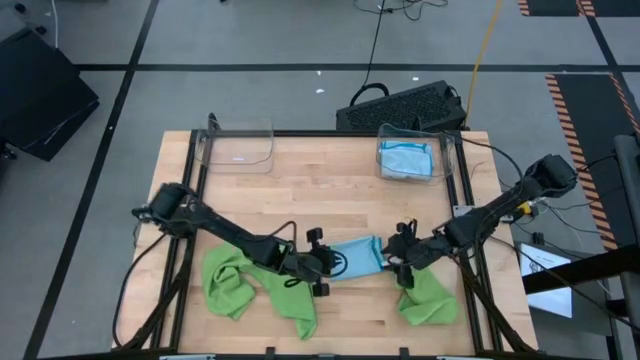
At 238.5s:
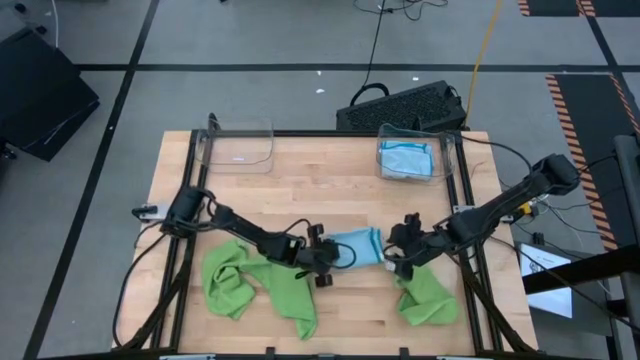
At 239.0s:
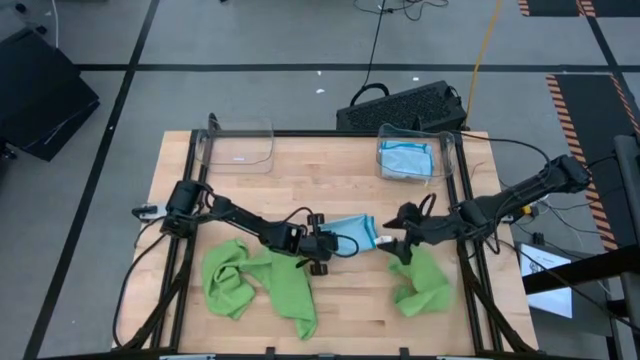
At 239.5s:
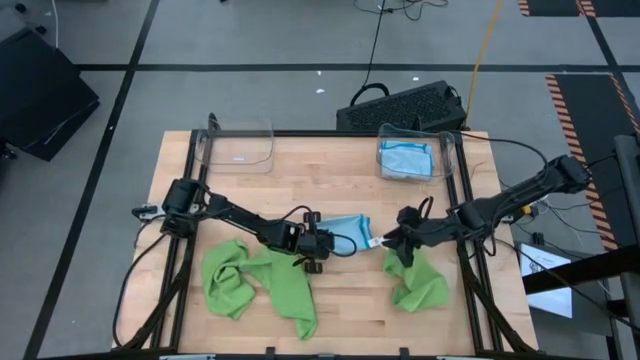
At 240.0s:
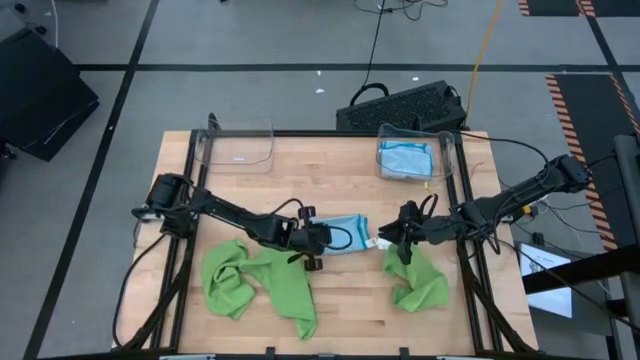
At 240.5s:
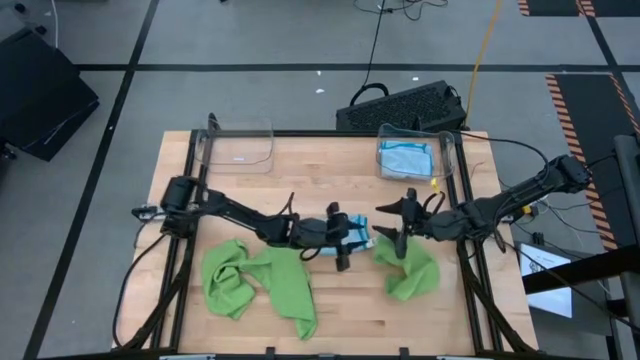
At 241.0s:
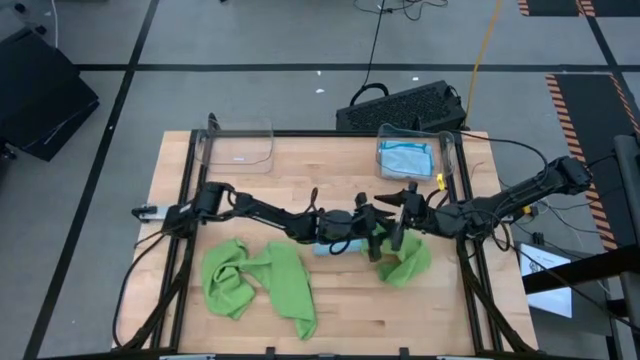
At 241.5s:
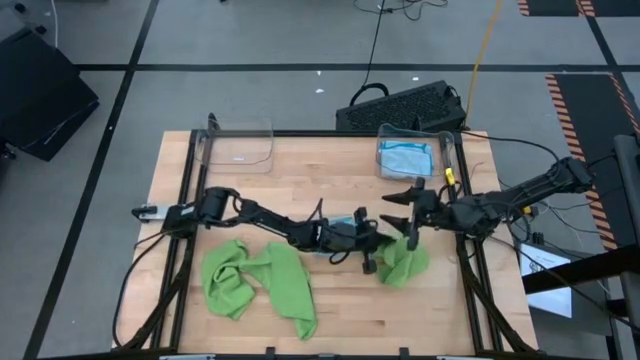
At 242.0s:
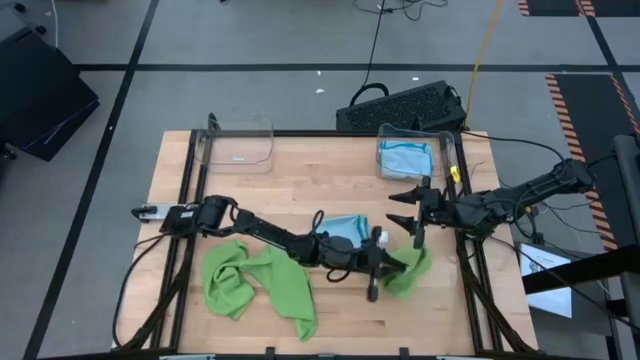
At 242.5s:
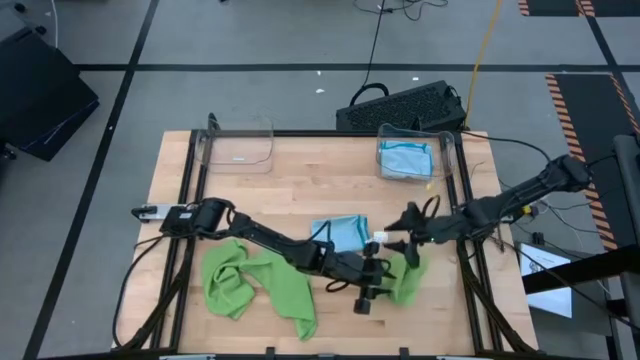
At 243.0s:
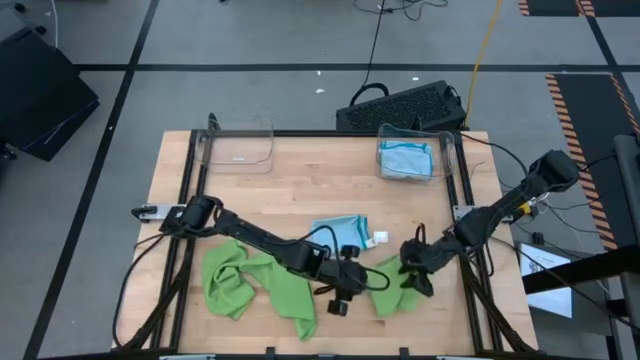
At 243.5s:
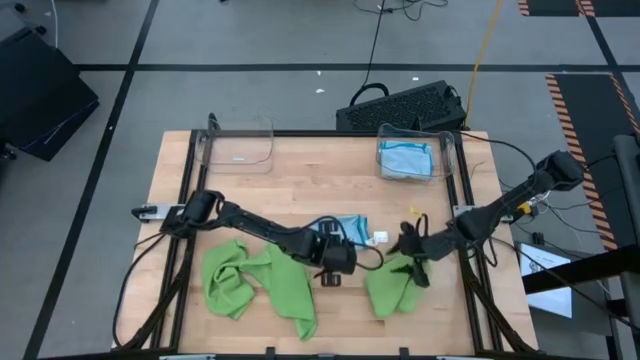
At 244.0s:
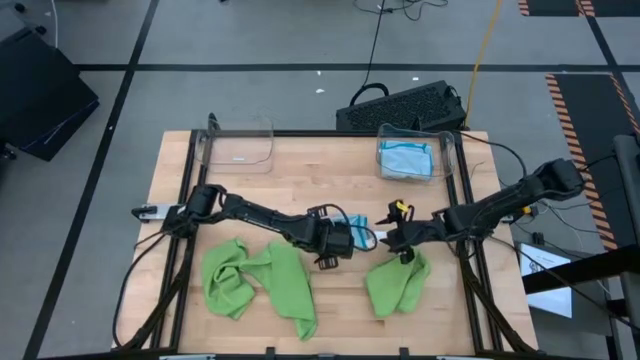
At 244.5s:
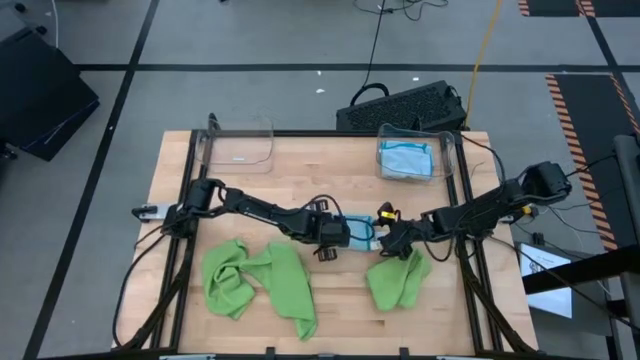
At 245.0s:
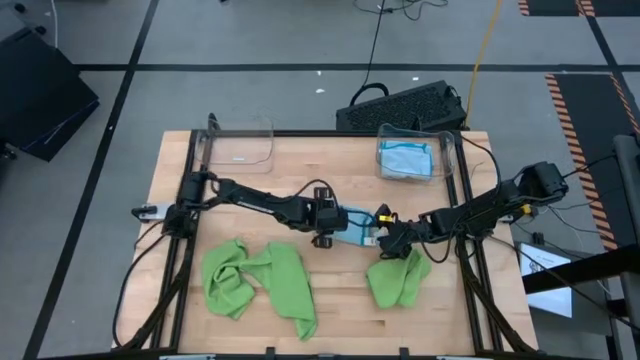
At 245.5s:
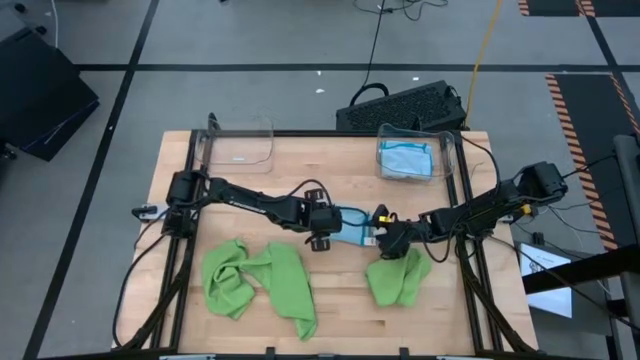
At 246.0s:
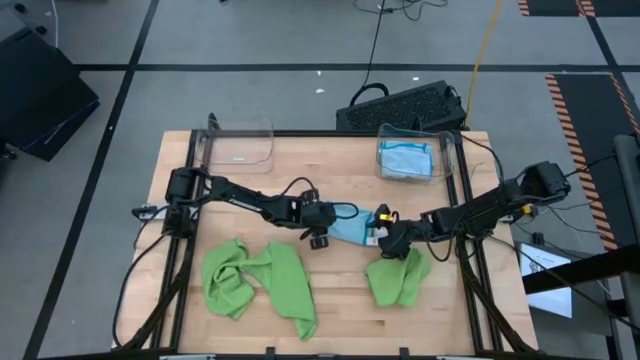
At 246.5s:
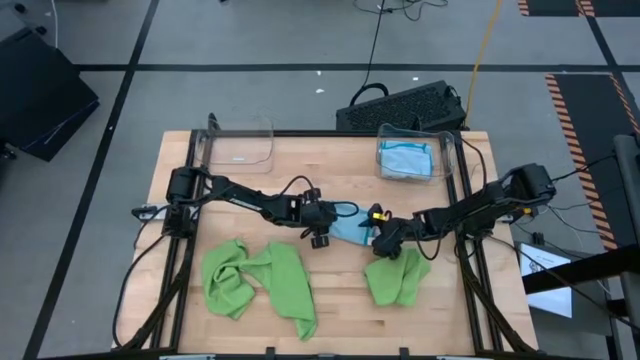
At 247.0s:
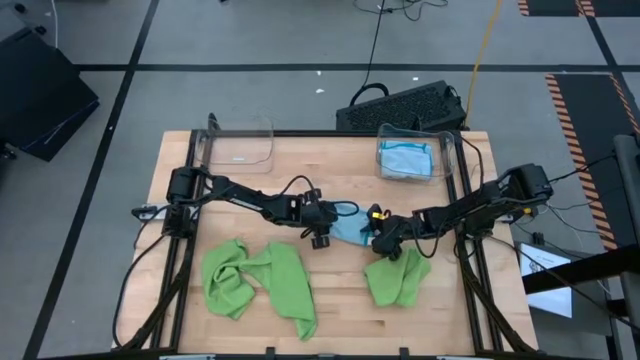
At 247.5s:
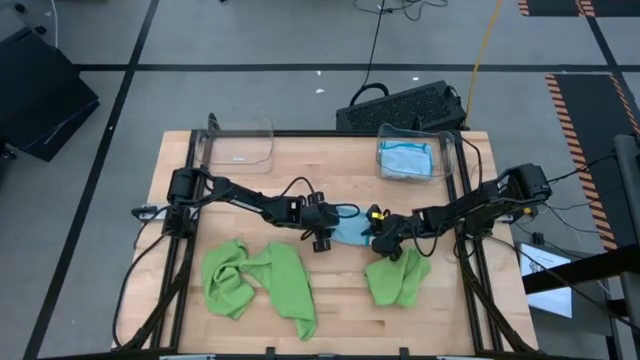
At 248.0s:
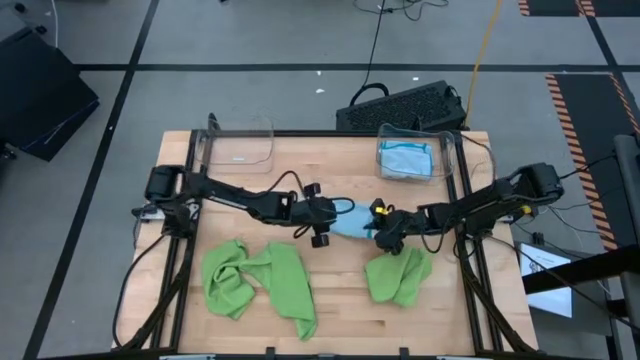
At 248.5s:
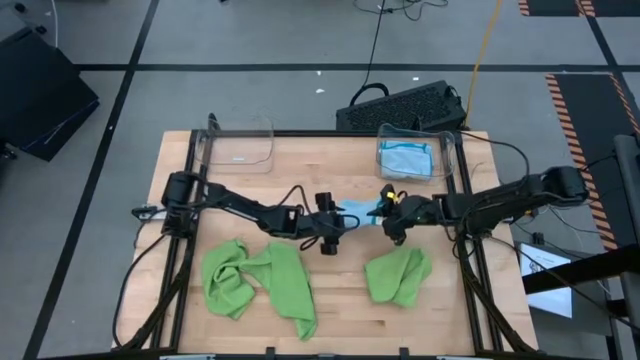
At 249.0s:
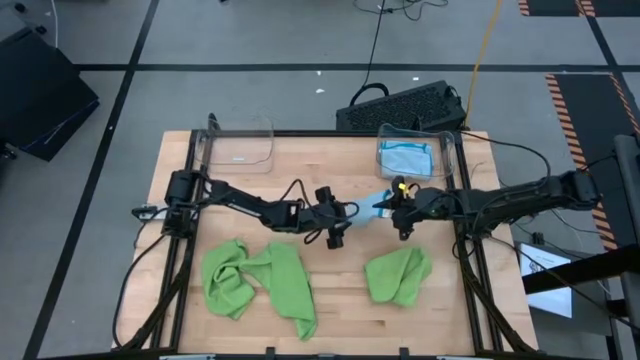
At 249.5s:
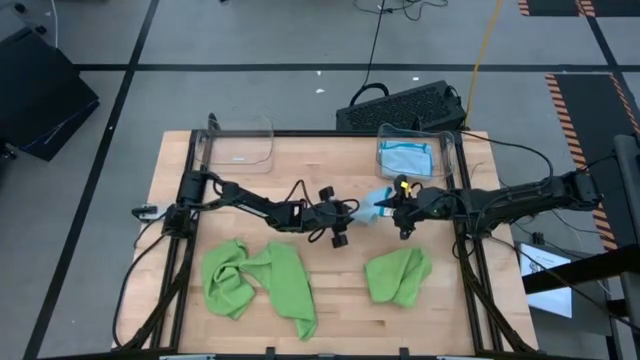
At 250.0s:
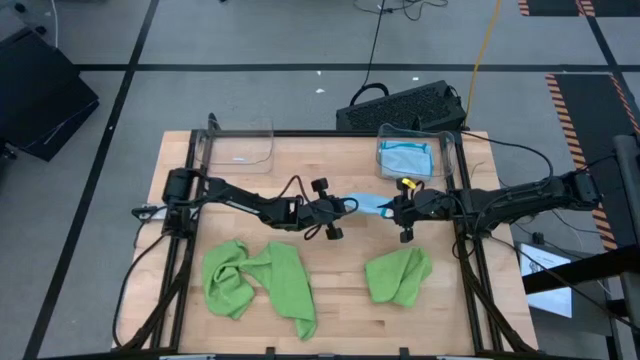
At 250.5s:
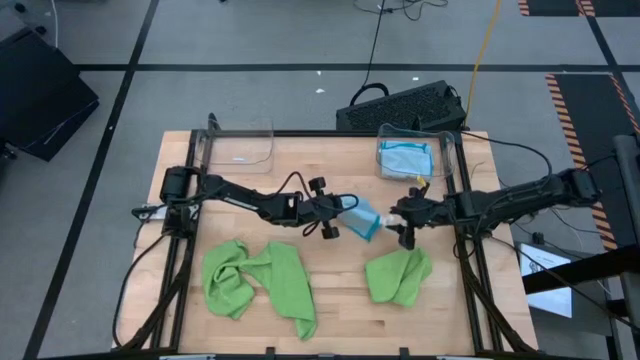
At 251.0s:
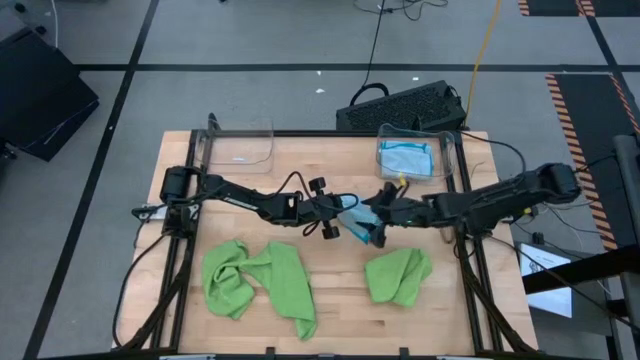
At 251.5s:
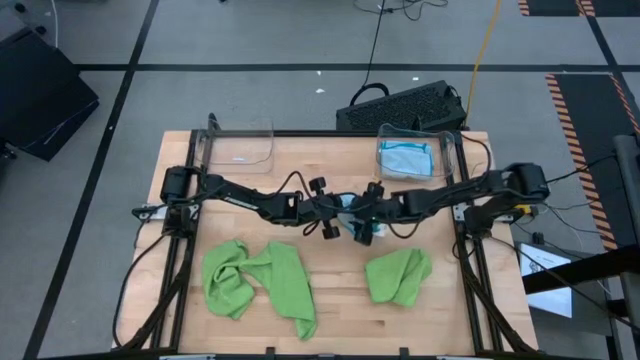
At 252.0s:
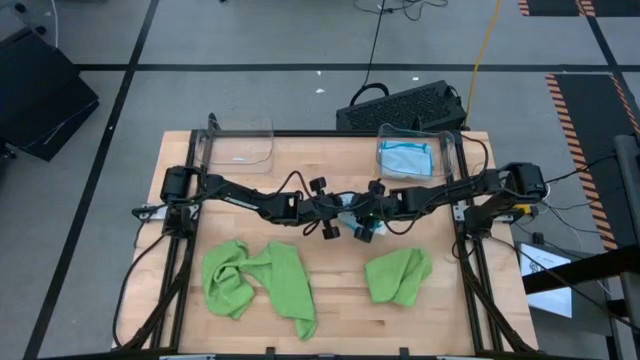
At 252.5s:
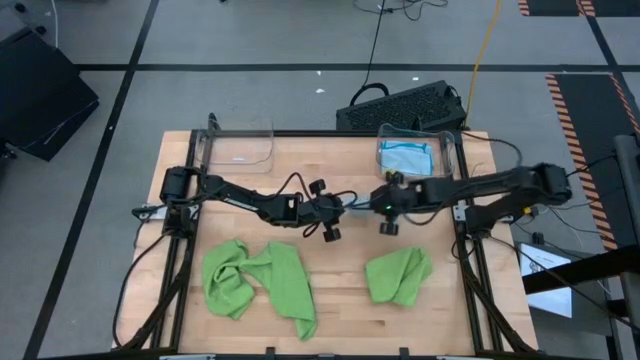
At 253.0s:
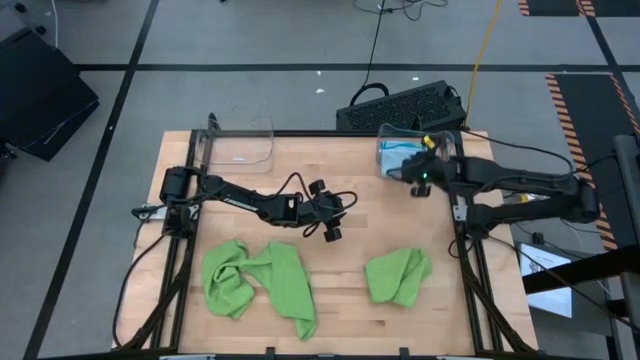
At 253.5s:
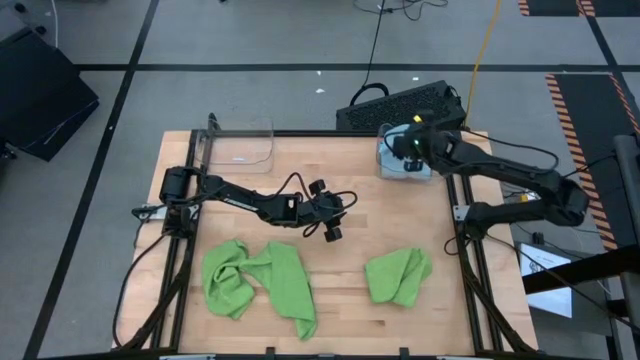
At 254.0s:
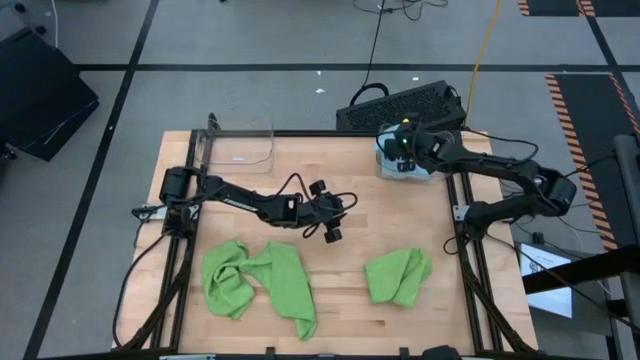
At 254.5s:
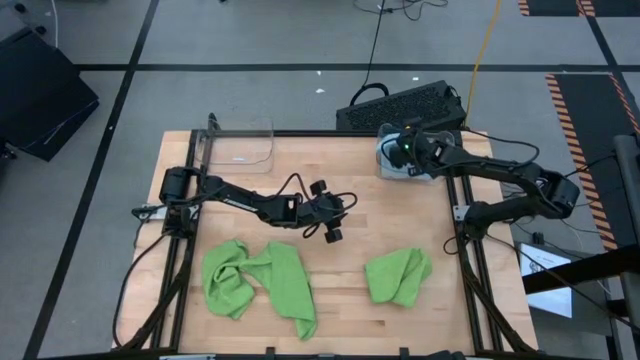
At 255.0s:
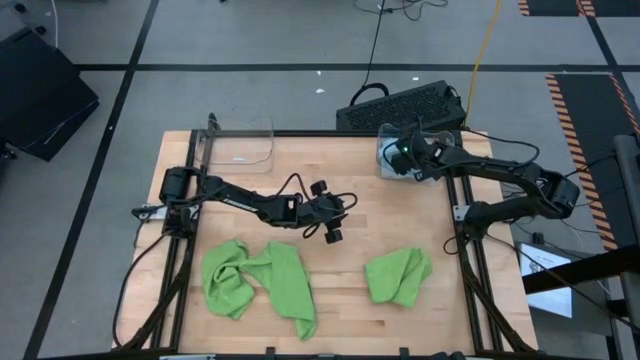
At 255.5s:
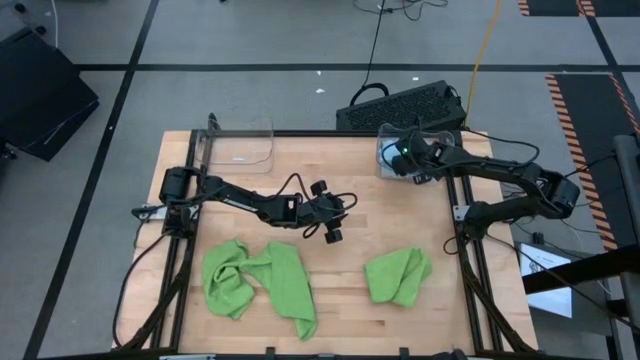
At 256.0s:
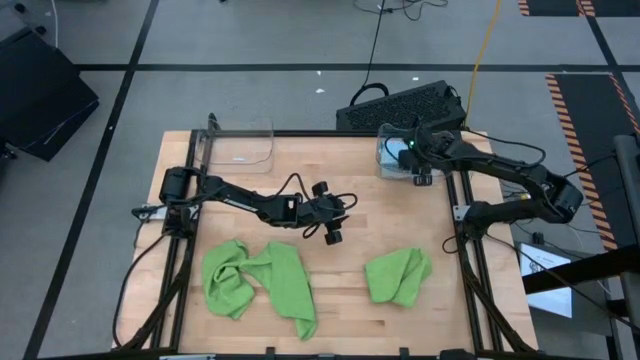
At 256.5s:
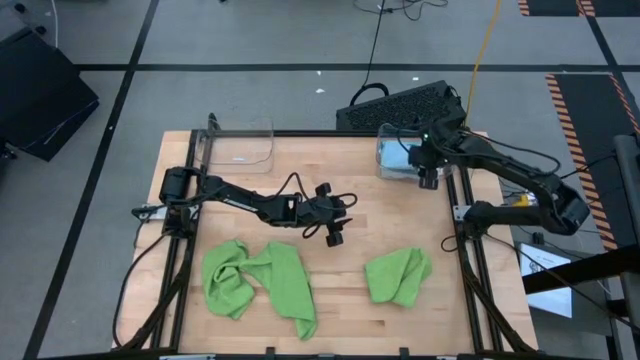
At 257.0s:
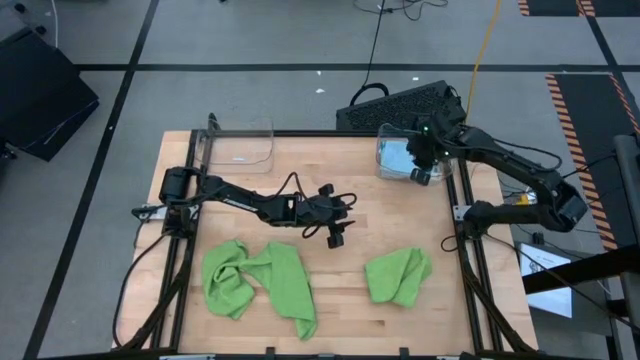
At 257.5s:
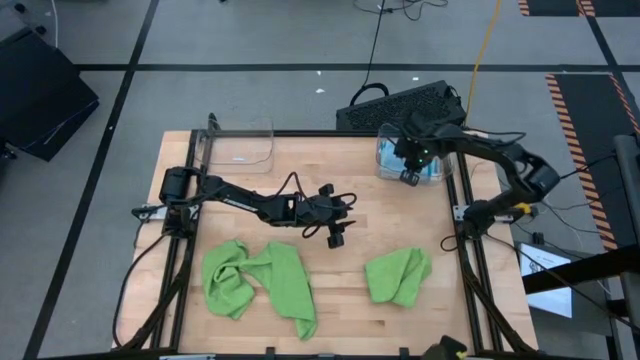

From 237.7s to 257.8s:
Task: Fold microfiber towels
Put the folded blue microfiber cloth into the right transparent bin

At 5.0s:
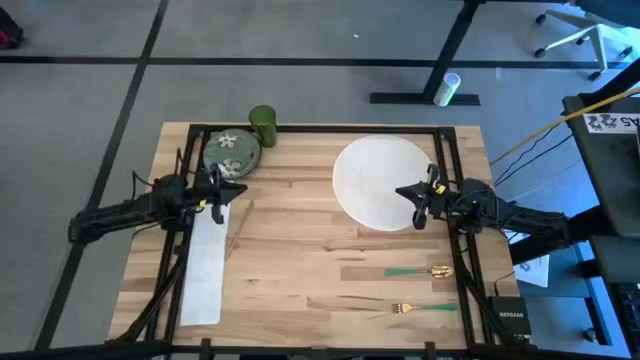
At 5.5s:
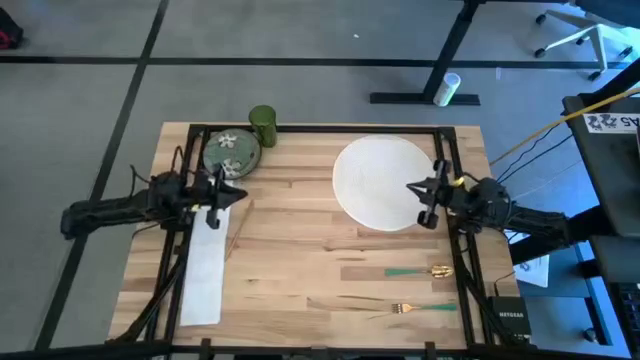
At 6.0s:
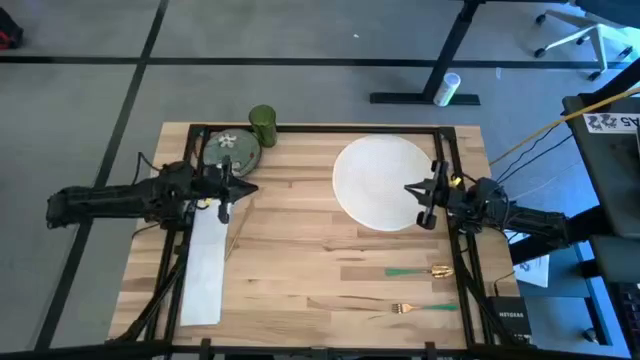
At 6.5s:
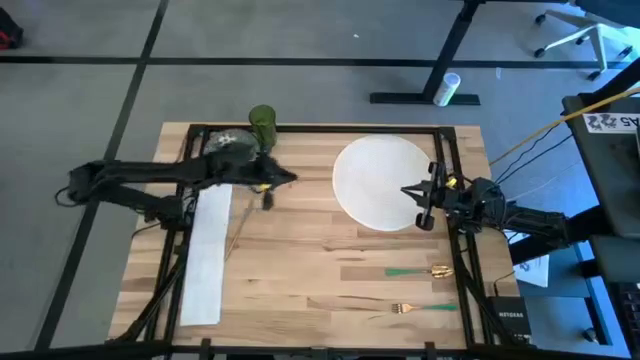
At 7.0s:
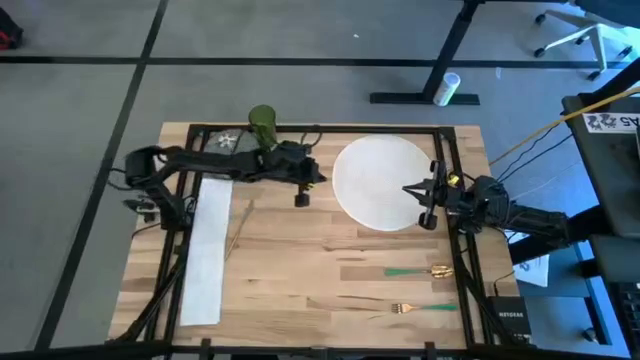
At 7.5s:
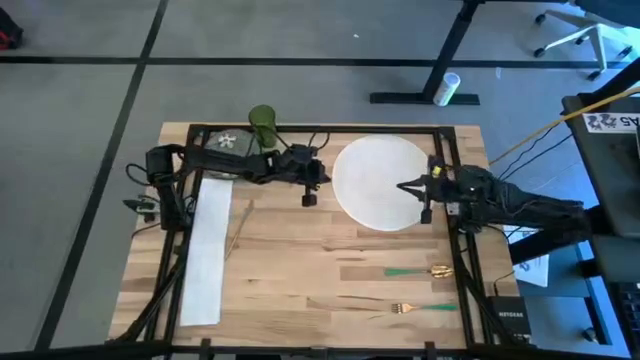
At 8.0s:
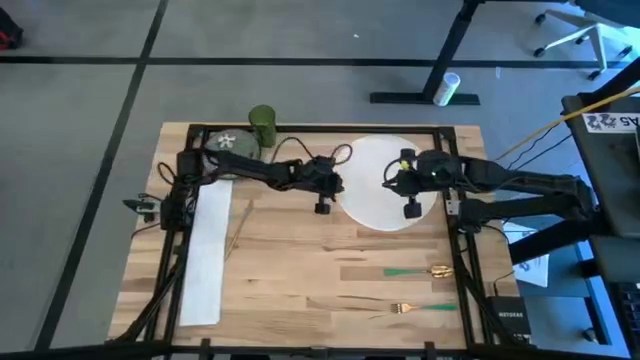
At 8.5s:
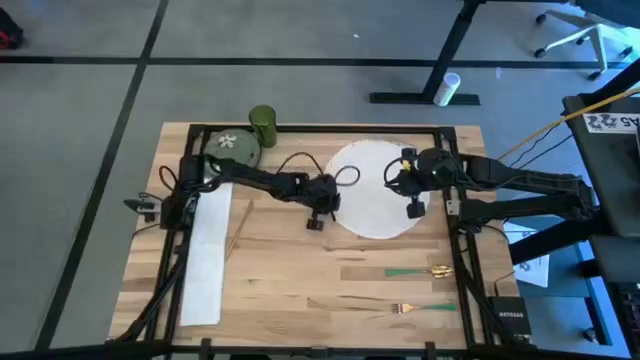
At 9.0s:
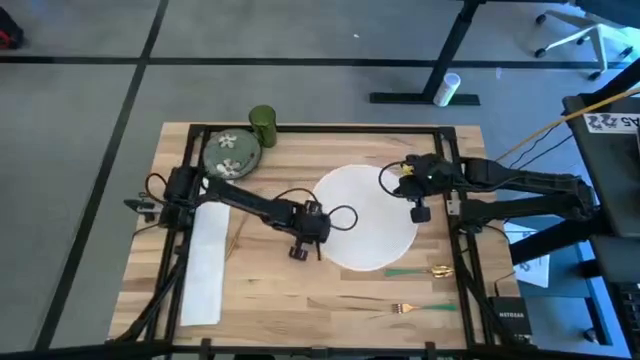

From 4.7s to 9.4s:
Task: Set table place
Move the white table mat to the center of the table
